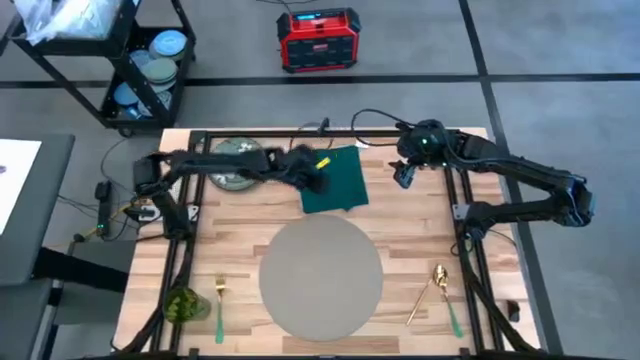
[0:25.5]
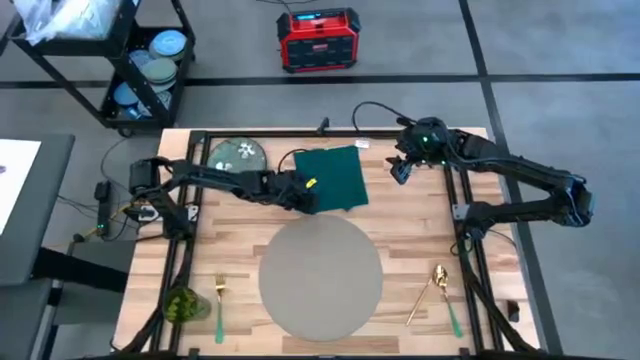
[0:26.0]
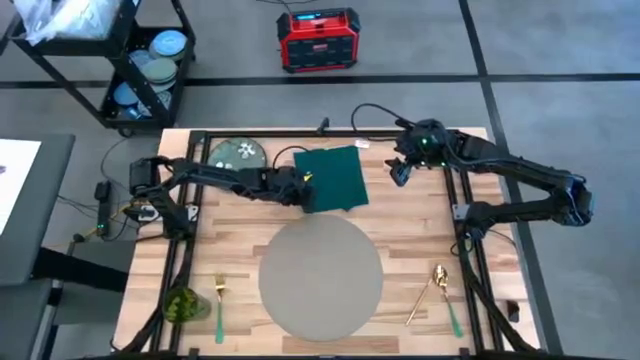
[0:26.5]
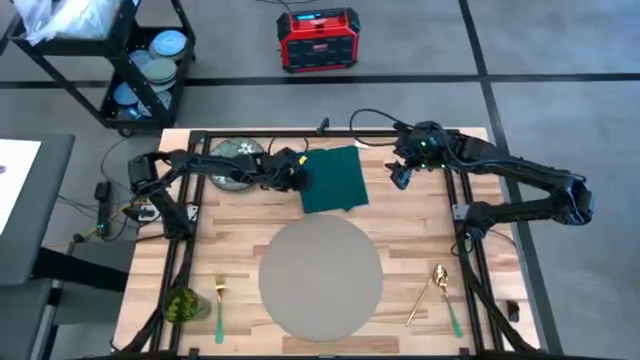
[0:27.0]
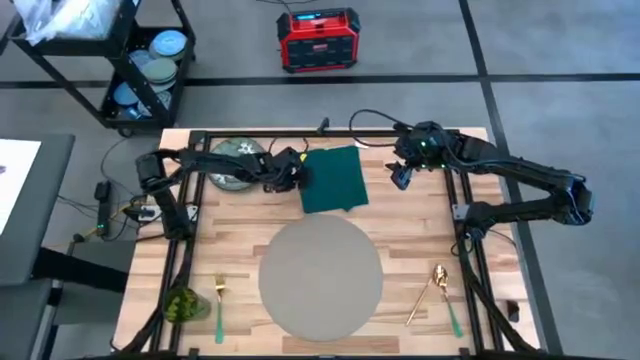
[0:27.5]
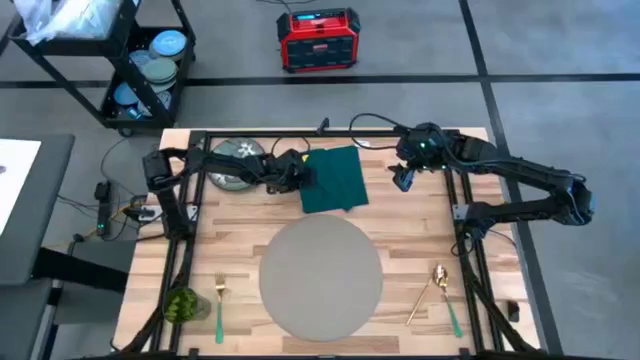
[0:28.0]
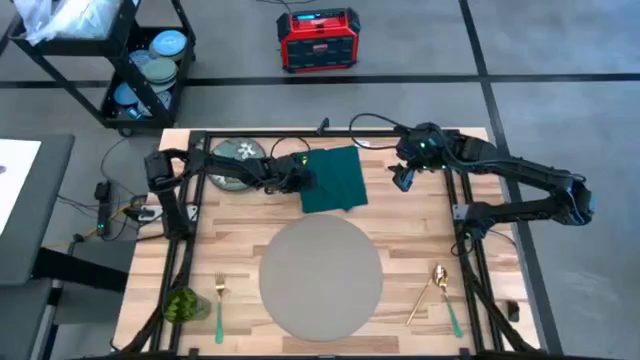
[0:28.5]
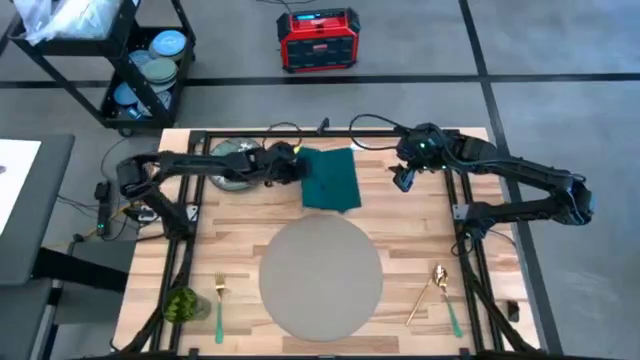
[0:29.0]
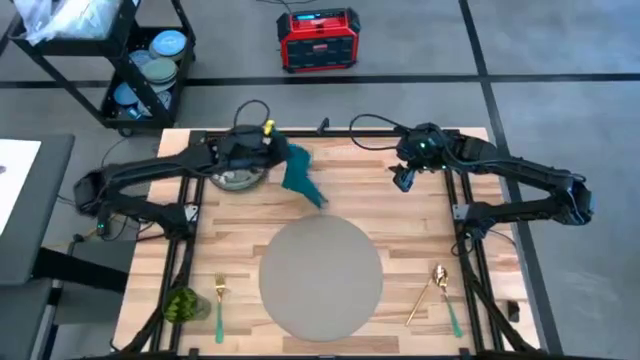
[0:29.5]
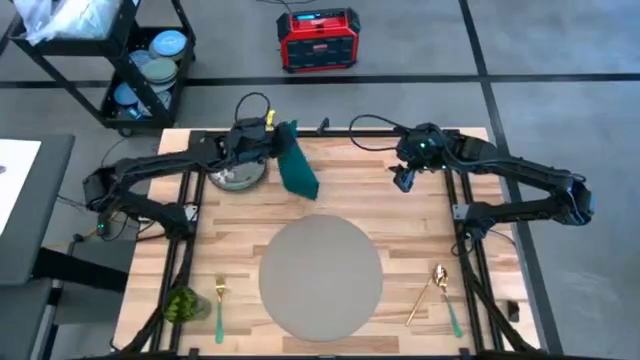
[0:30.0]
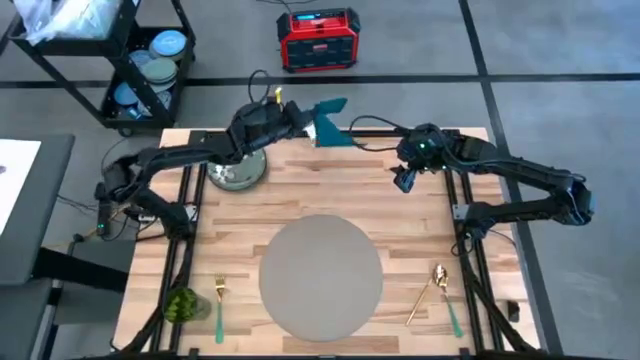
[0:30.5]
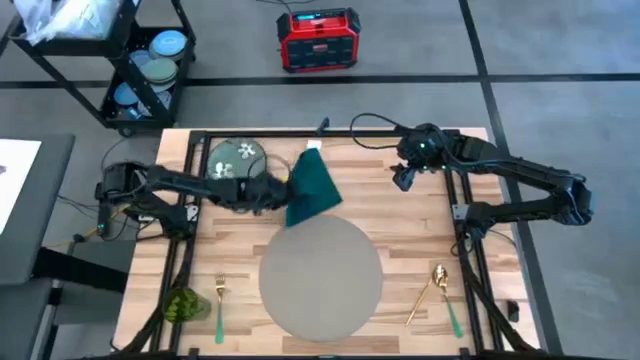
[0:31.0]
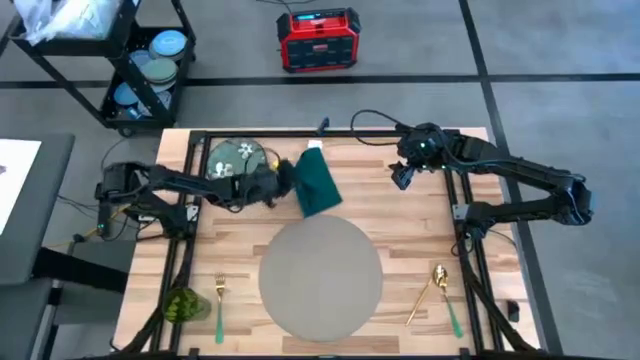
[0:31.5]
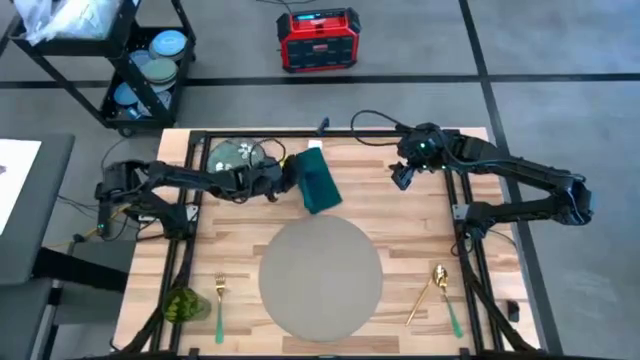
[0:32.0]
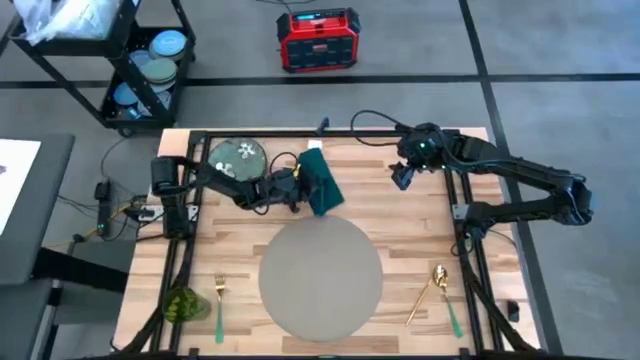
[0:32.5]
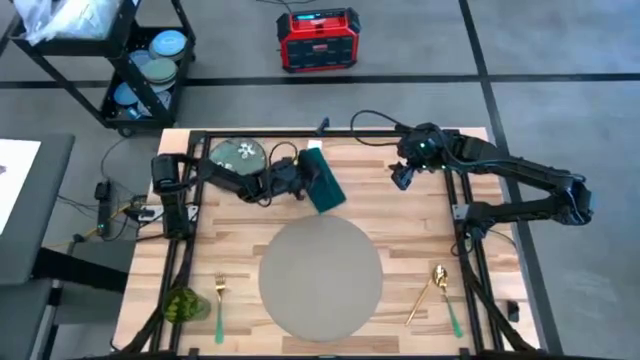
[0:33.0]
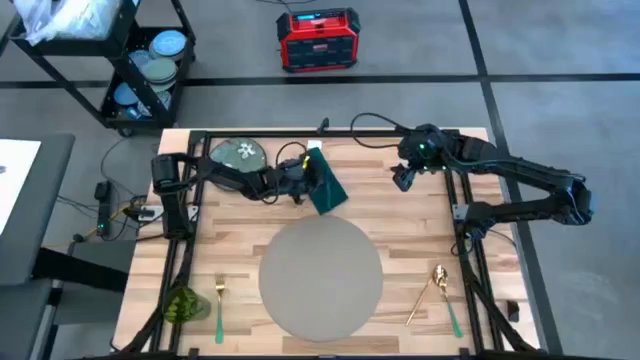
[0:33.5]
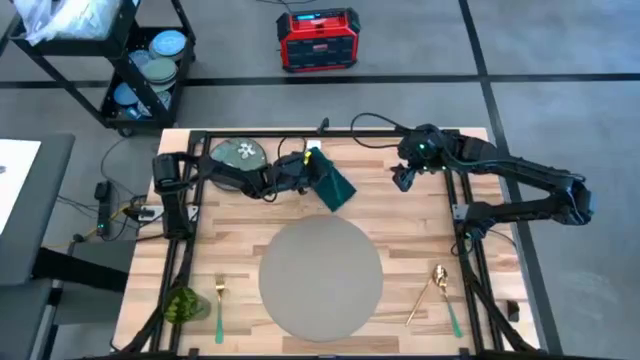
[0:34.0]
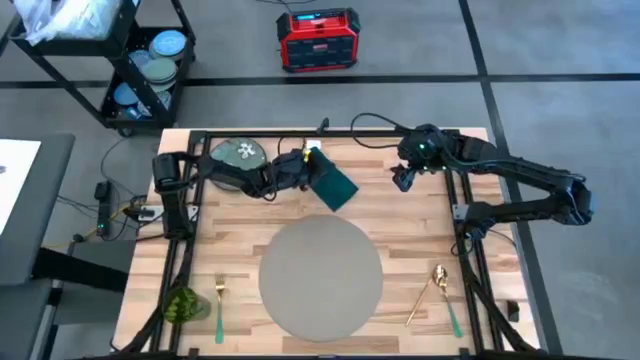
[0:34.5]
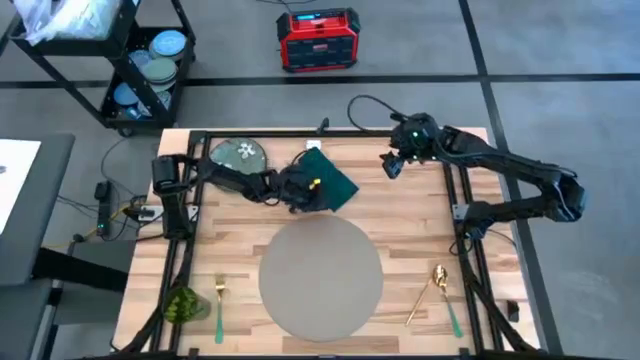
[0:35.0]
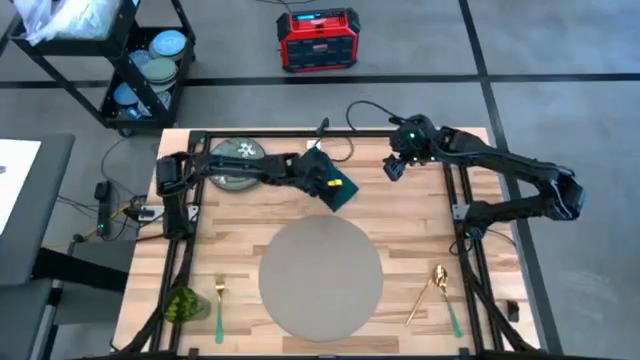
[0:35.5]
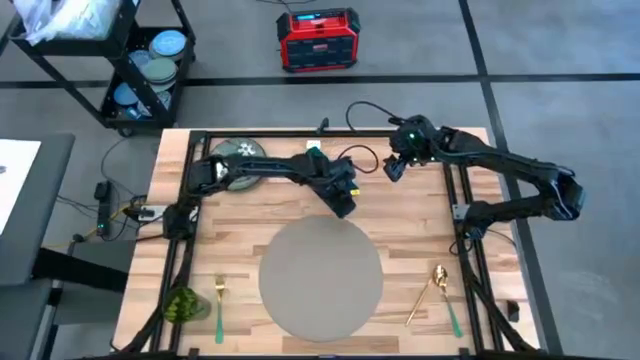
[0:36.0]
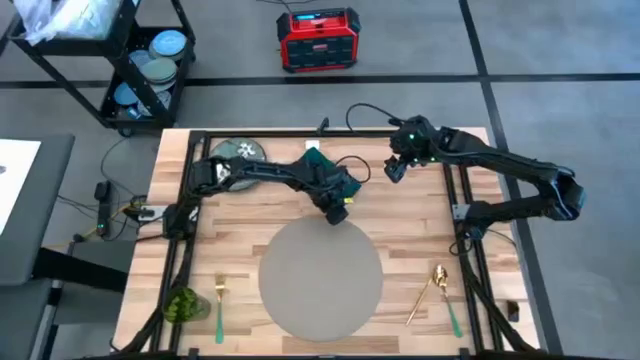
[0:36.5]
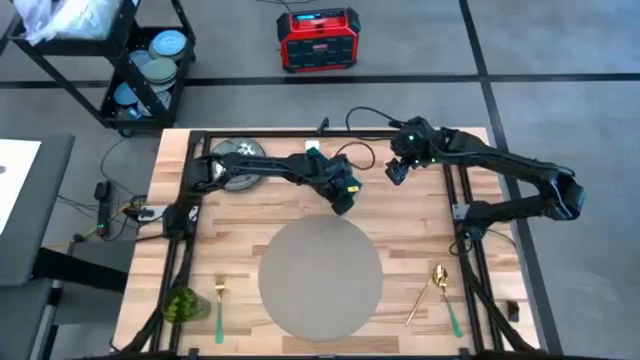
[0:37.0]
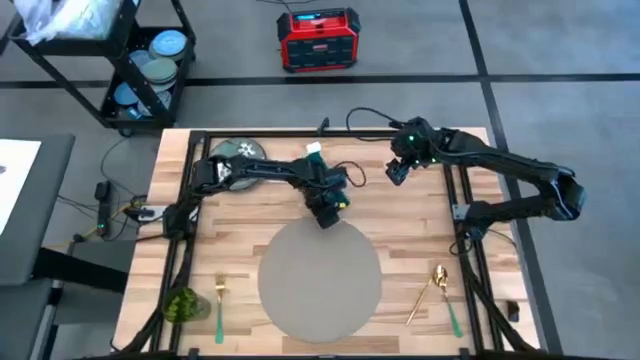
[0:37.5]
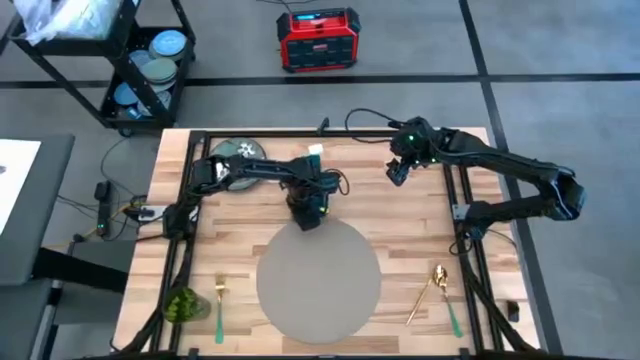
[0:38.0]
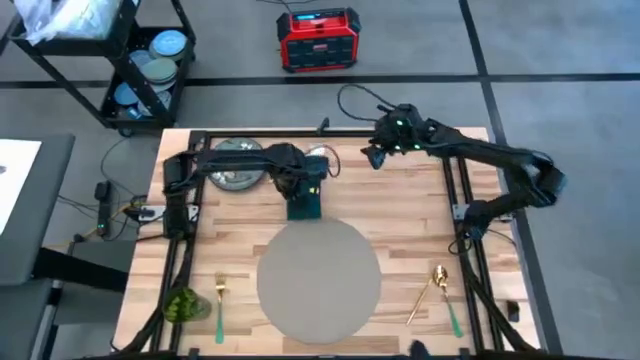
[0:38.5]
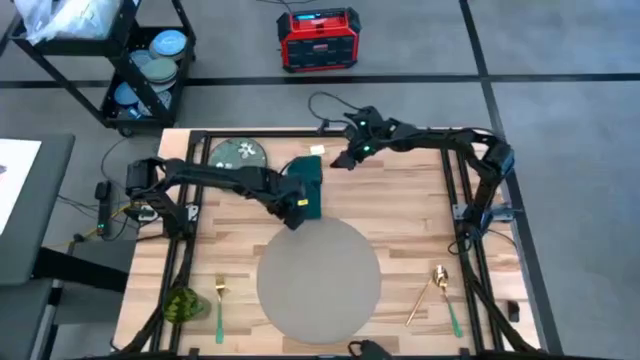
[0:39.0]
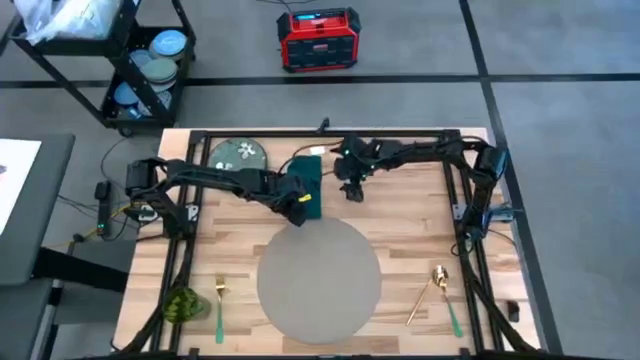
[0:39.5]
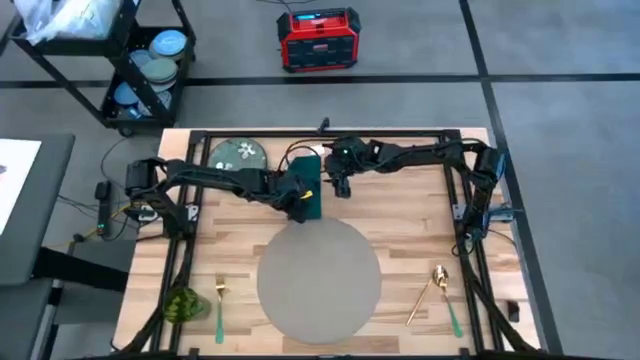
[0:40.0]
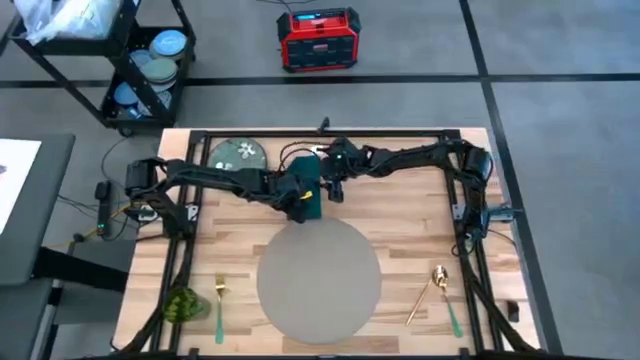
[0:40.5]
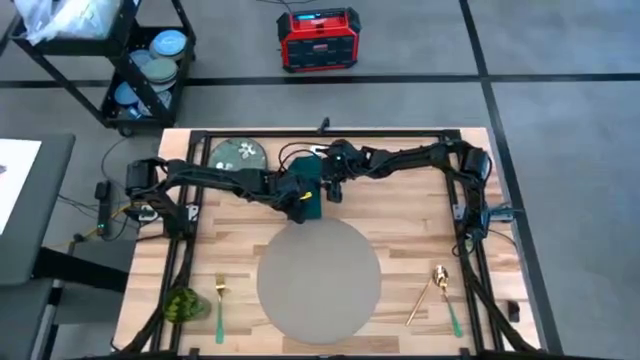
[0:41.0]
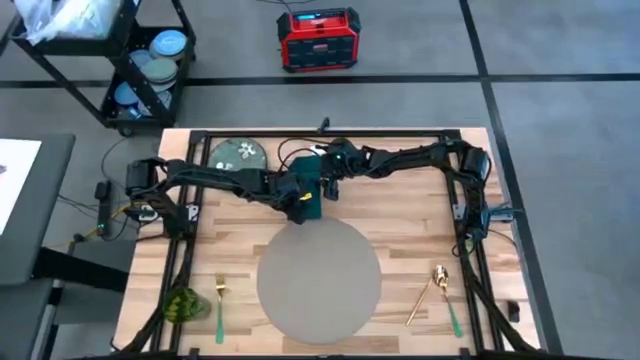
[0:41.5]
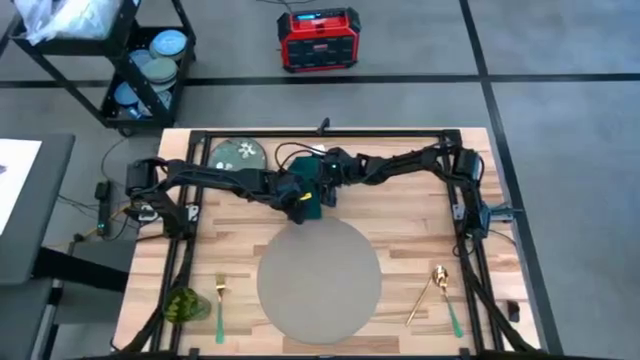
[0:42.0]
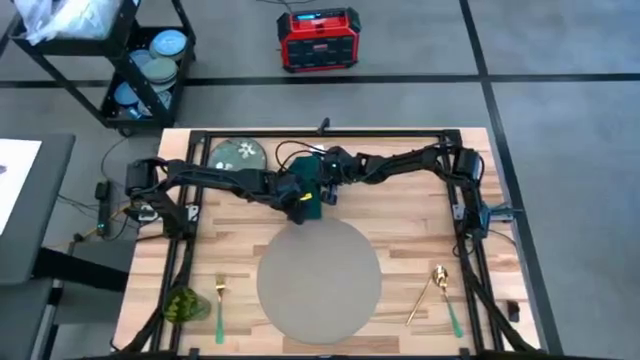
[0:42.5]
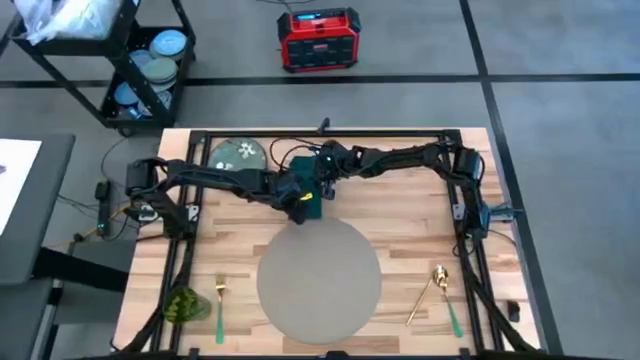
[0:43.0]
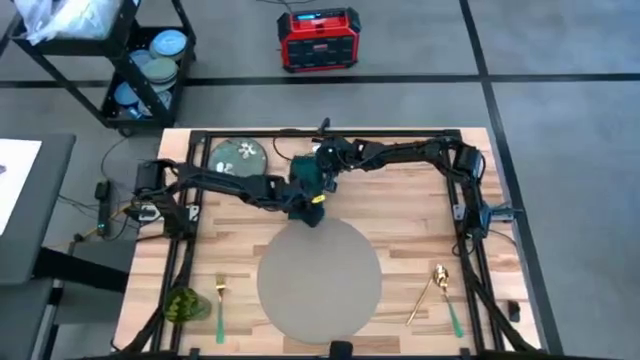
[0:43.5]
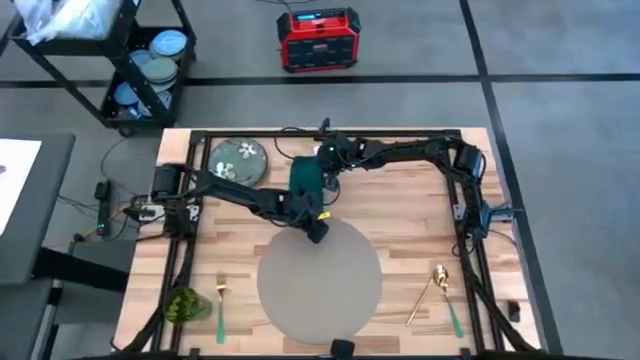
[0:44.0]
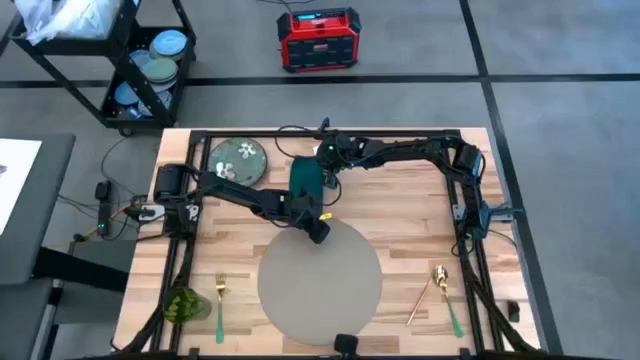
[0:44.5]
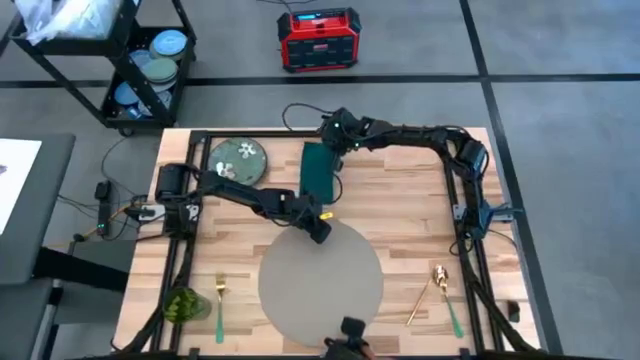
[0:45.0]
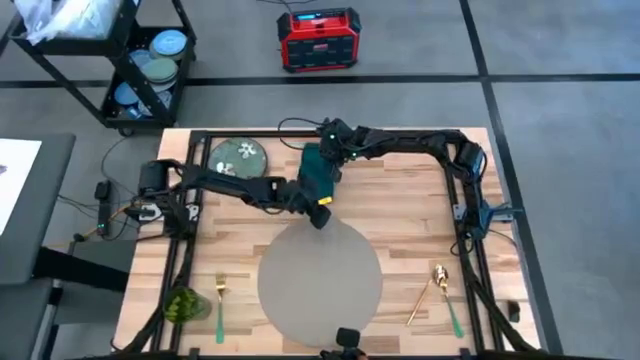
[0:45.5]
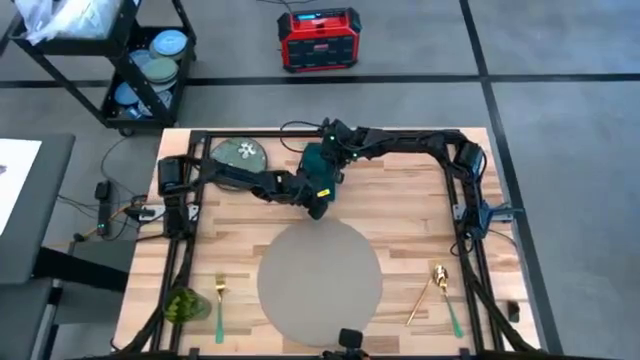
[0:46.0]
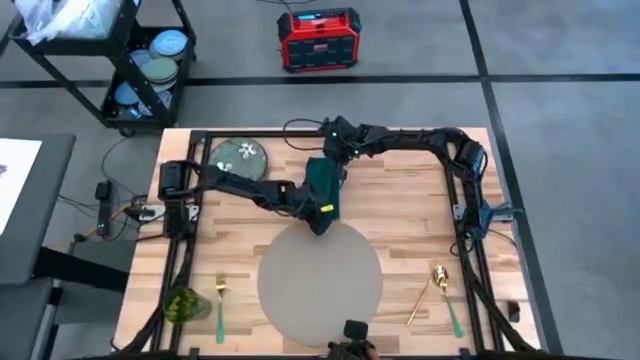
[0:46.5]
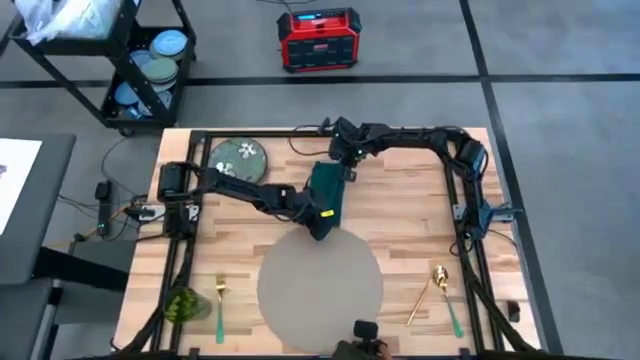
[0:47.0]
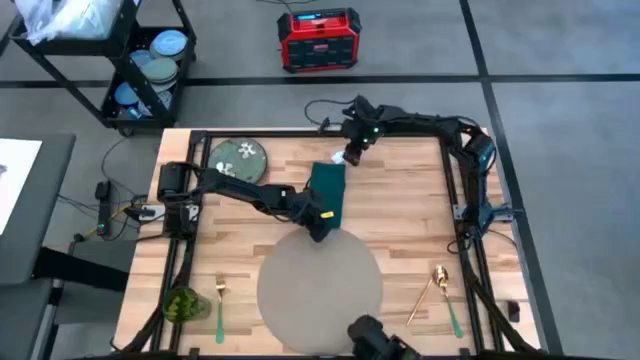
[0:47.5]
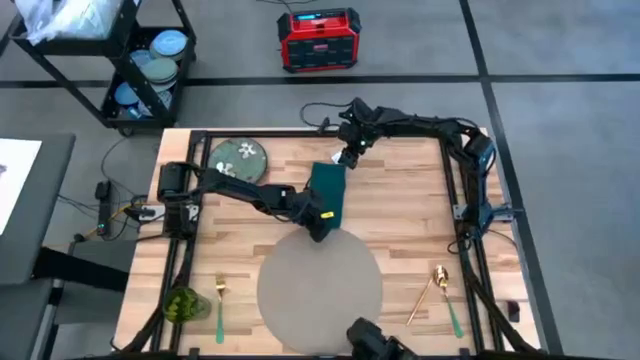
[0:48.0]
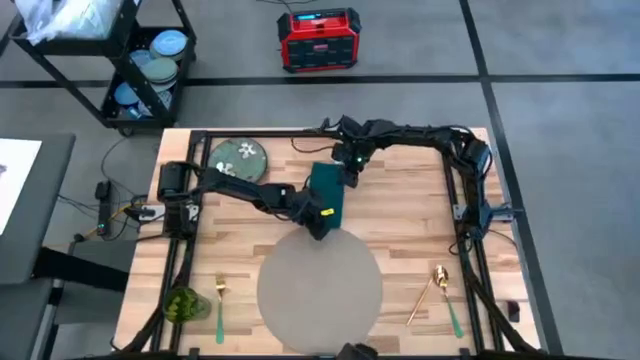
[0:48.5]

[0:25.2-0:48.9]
Task: Set table place
Fold the blue table napkin
